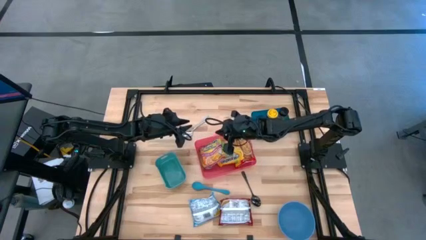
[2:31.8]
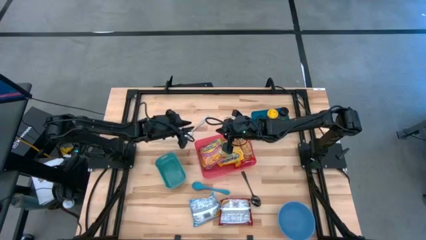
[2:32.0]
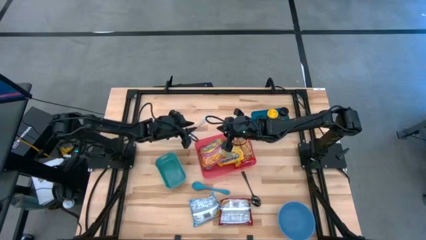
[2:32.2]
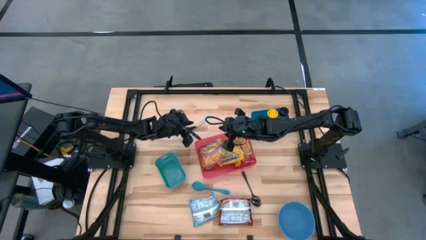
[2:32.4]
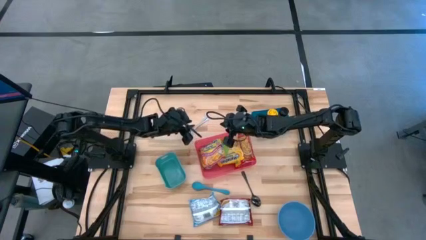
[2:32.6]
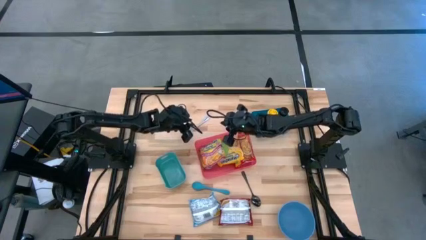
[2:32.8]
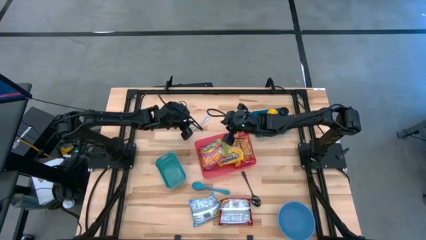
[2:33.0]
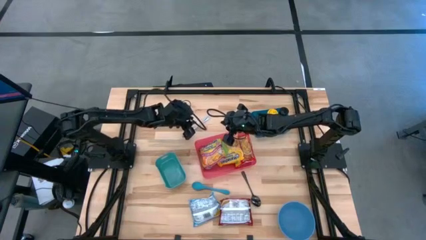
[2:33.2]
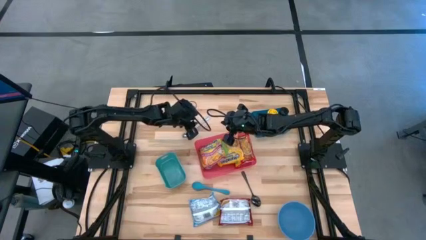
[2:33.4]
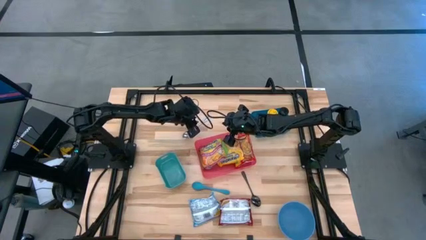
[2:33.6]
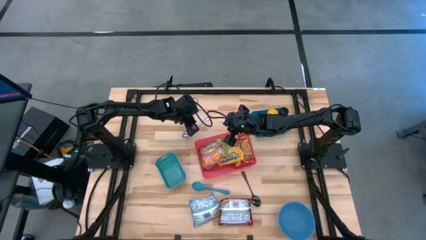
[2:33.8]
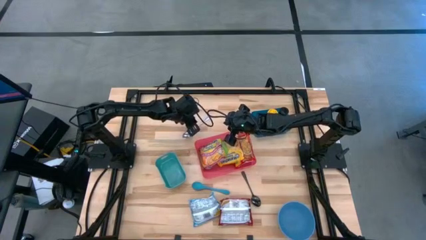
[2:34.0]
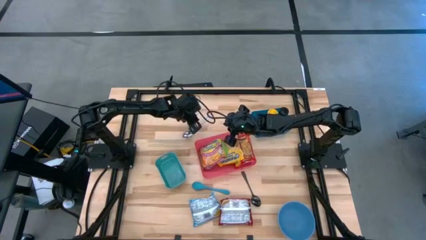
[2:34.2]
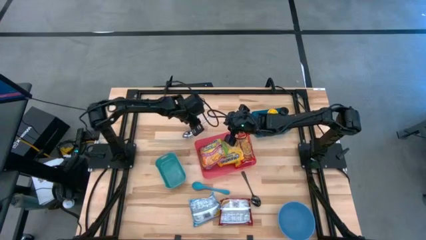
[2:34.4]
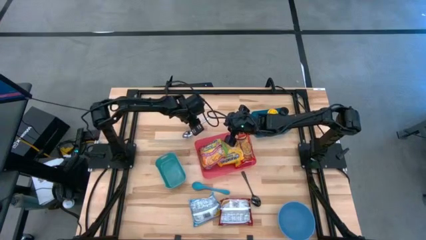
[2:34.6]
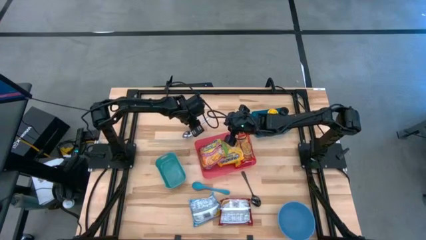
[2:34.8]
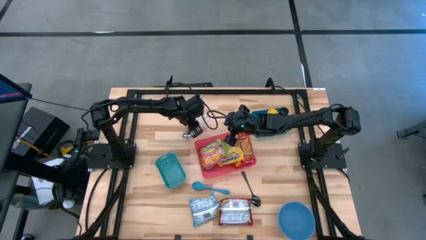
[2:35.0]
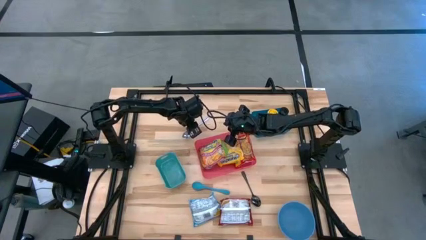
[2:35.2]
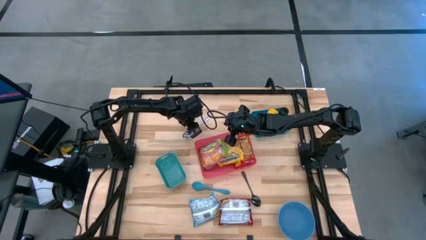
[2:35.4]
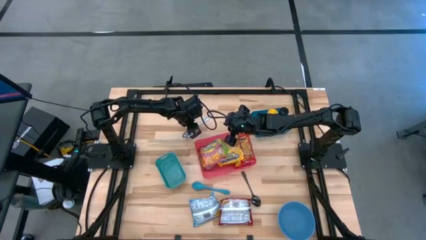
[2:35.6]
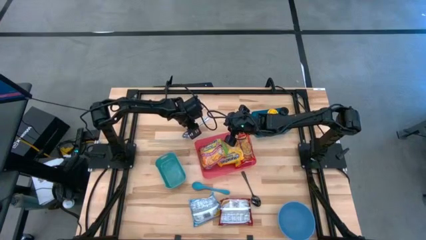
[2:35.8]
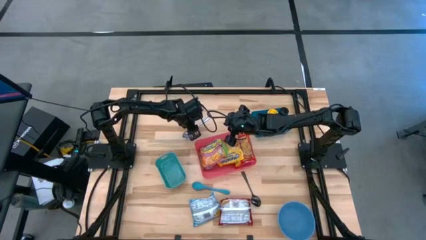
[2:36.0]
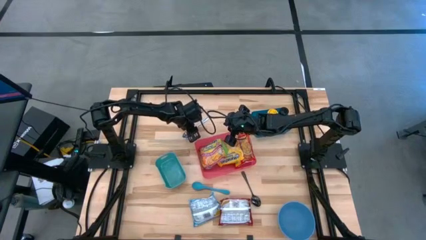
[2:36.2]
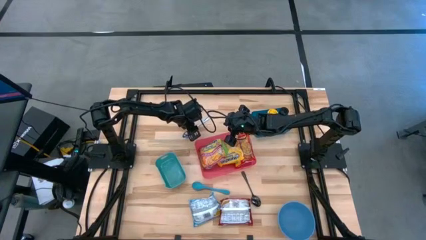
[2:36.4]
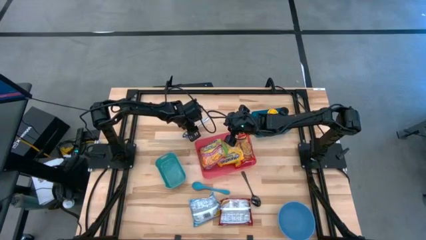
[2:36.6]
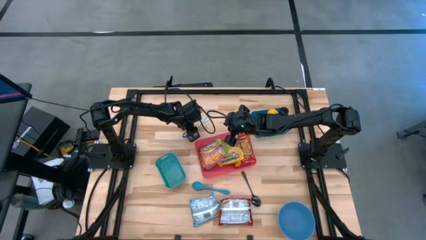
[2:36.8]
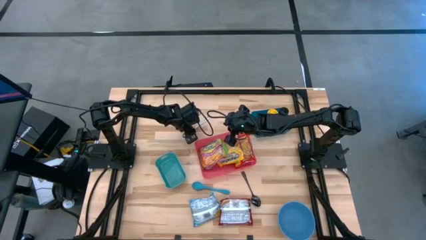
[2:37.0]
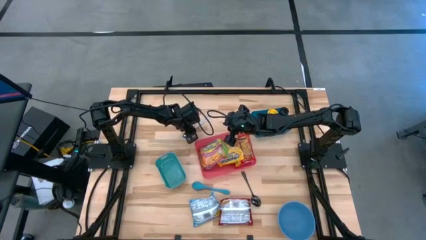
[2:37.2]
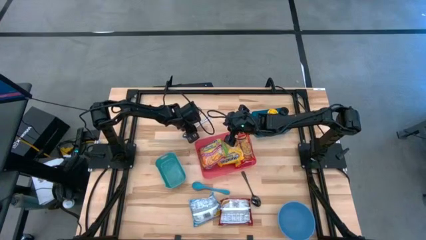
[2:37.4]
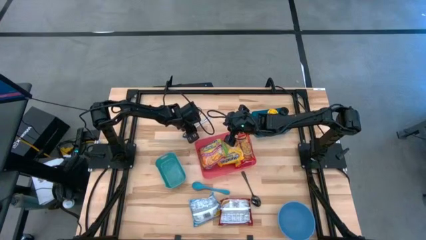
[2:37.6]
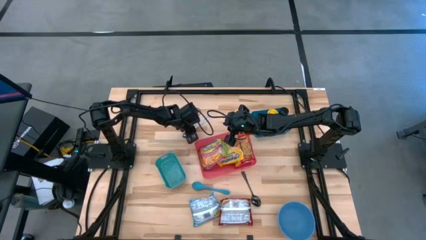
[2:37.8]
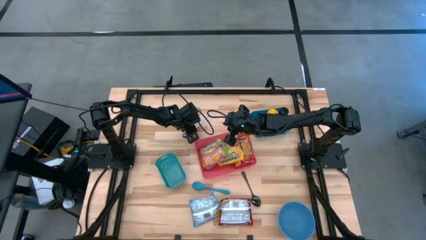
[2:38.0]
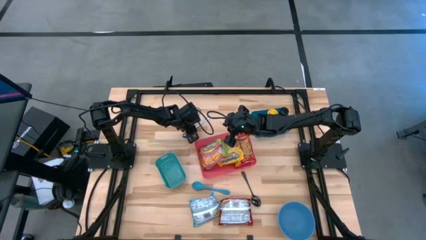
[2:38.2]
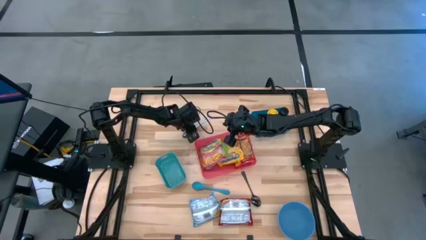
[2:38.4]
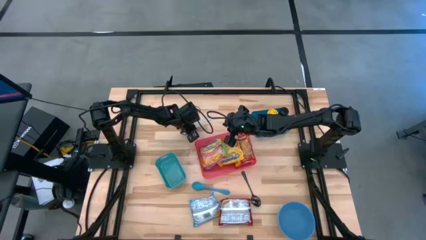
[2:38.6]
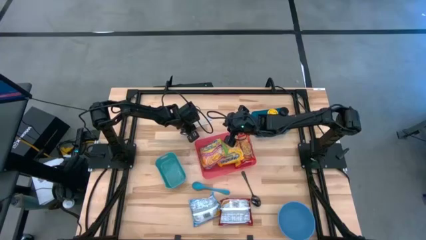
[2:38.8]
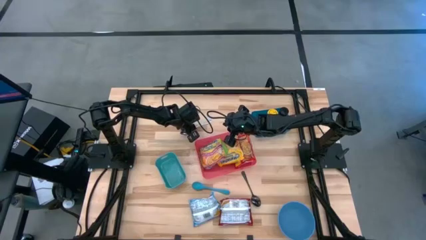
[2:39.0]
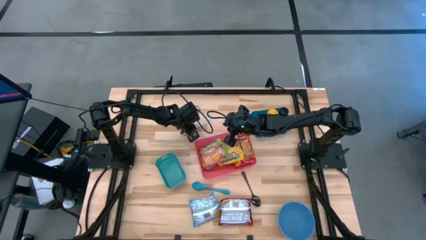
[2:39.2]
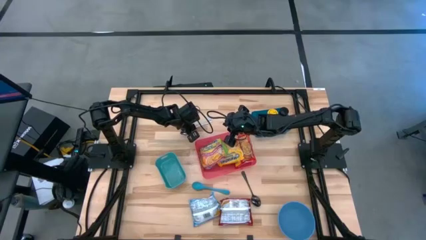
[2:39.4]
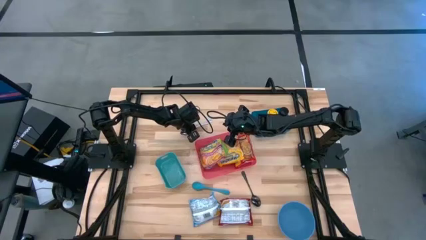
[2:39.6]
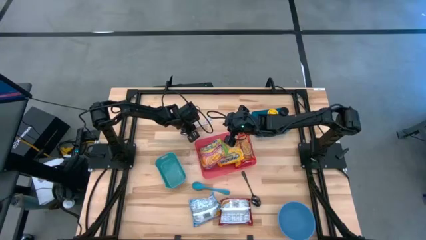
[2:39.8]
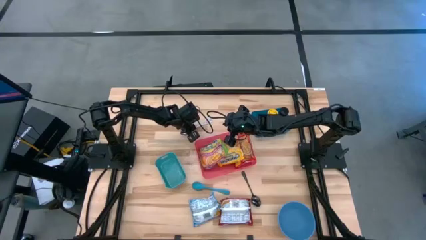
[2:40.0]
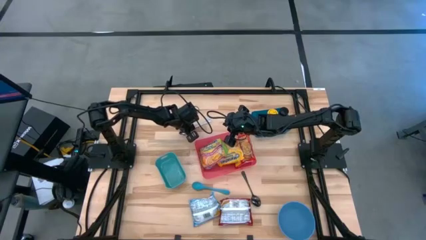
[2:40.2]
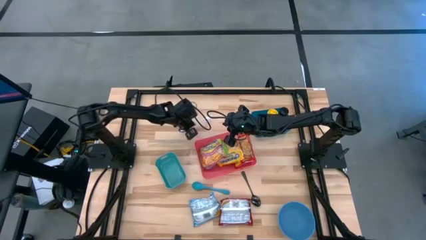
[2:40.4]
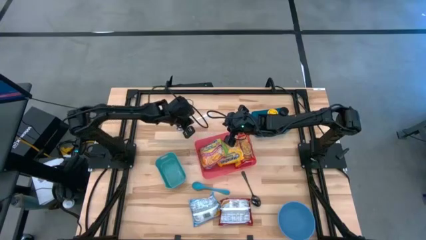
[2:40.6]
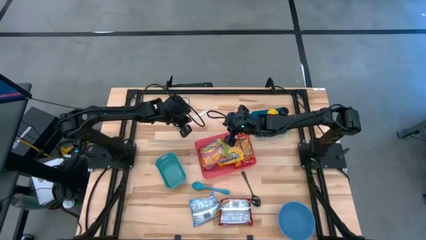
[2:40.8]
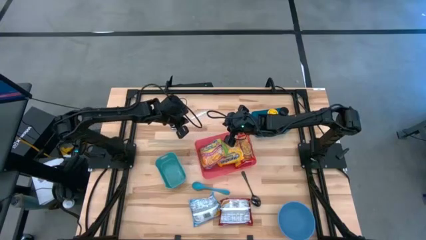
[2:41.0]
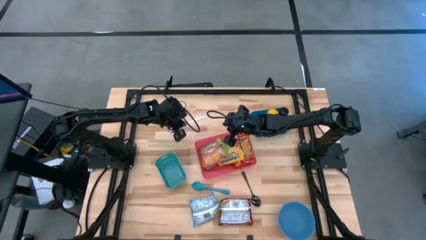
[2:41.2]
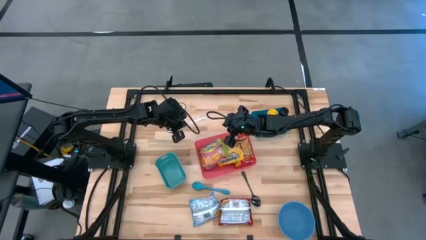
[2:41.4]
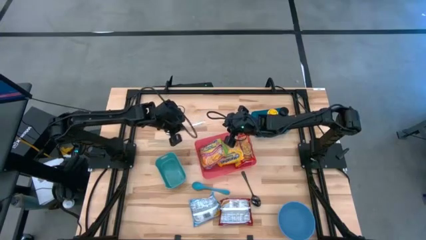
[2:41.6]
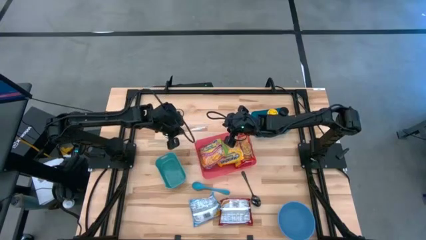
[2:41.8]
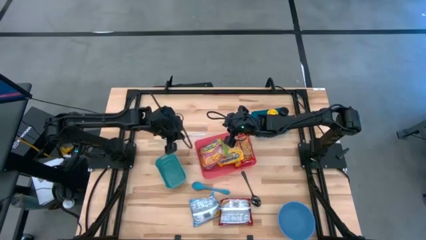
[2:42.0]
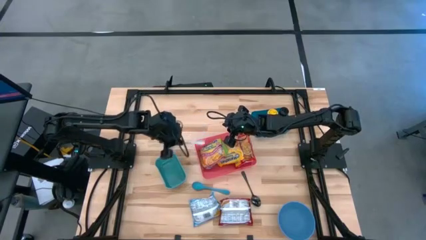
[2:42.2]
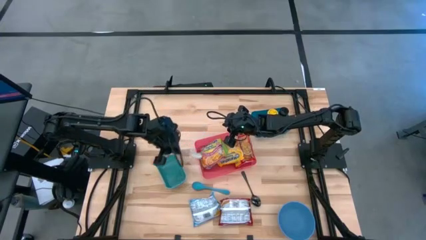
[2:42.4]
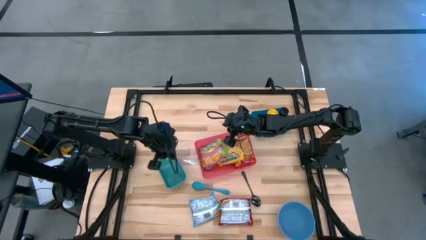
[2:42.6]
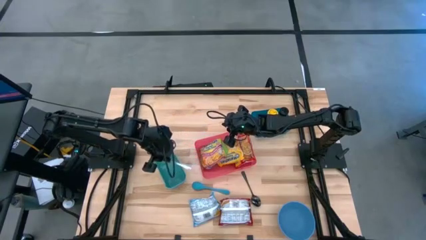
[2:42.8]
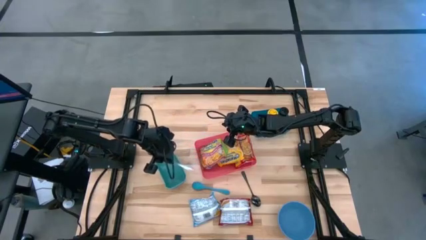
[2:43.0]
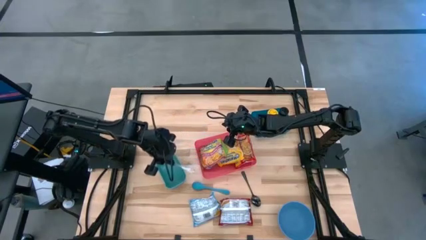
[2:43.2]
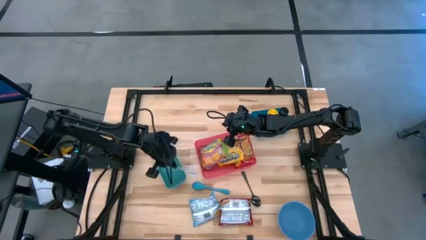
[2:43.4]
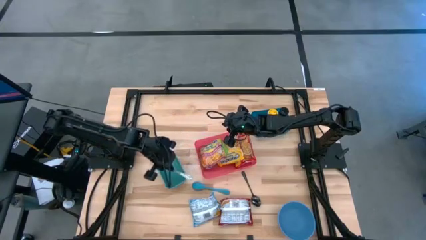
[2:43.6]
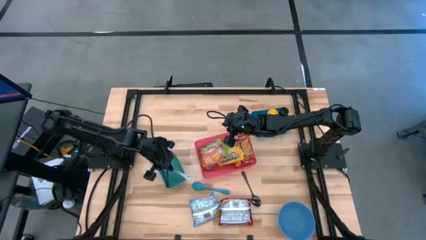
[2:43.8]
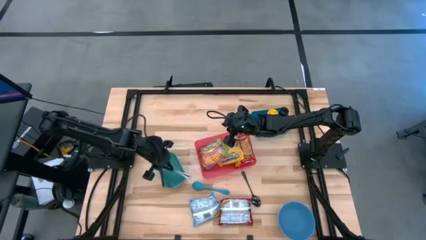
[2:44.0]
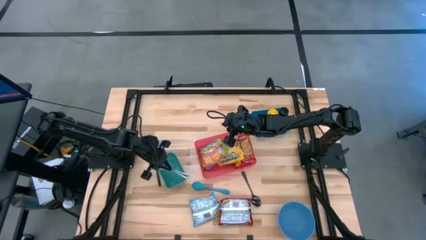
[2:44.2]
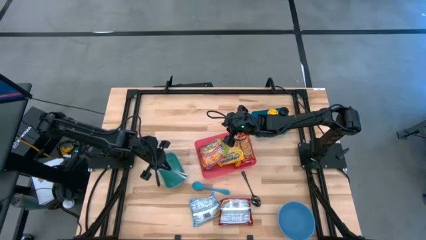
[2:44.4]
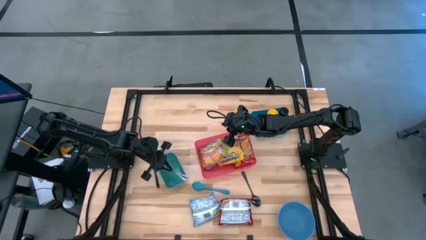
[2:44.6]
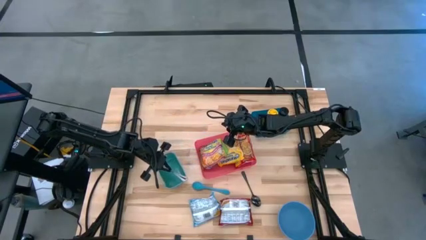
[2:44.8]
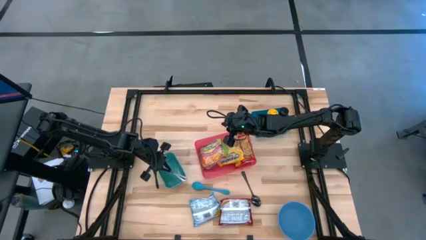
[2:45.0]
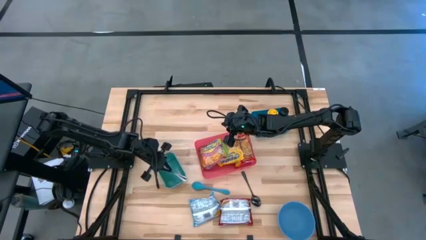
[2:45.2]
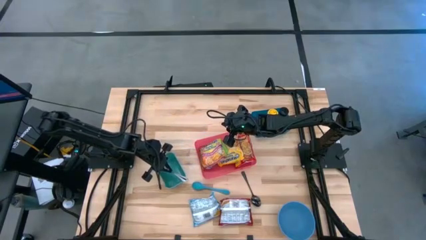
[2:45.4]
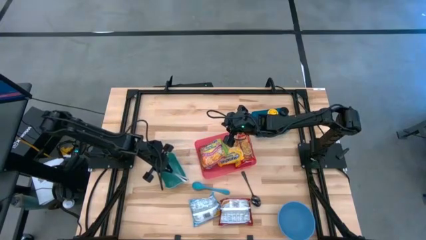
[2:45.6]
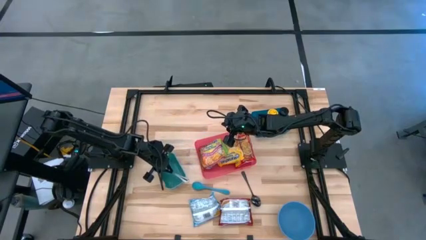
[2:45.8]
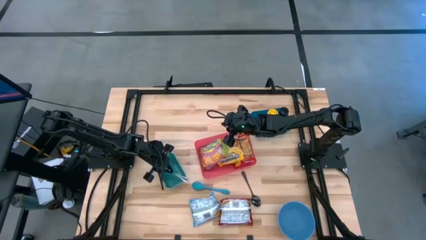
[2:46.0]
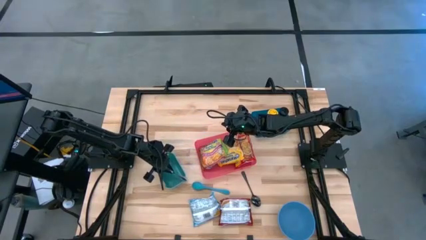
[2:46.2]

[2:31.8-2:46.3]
Task: Pick & Place Food Item
Put the silver spoon into the green bin
